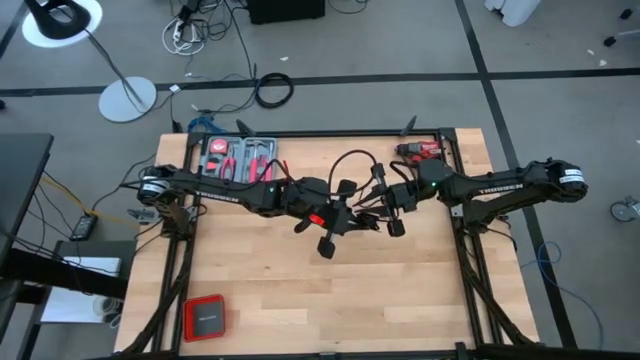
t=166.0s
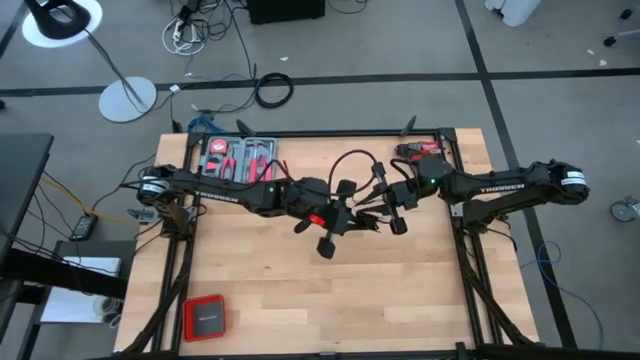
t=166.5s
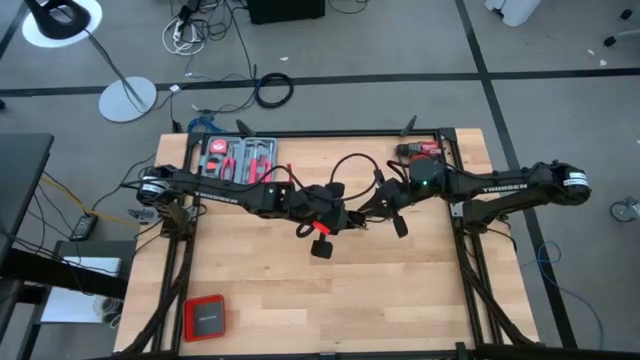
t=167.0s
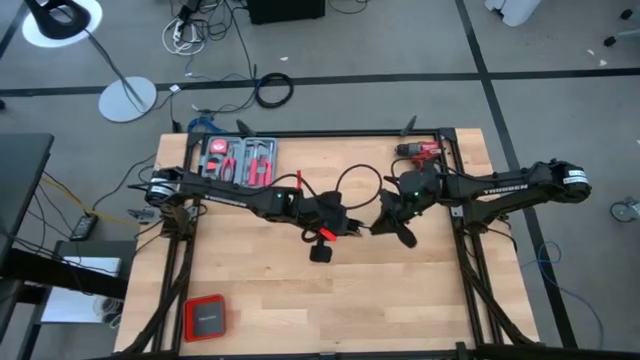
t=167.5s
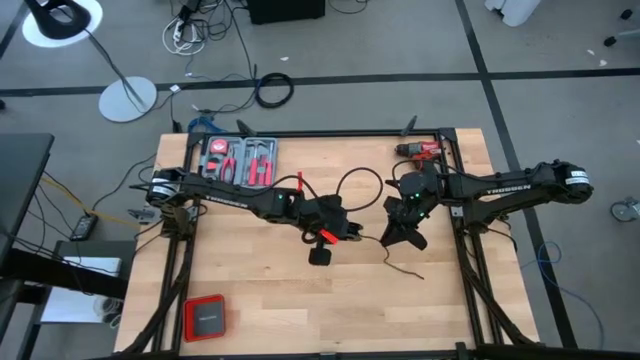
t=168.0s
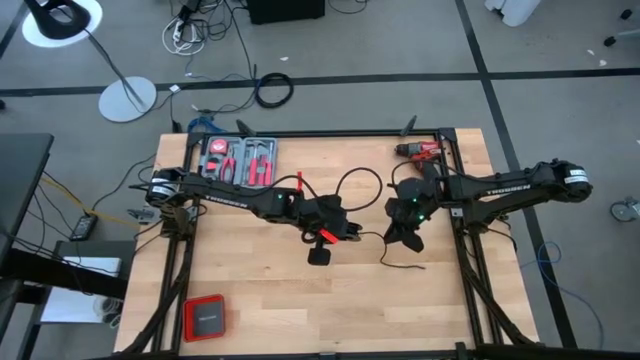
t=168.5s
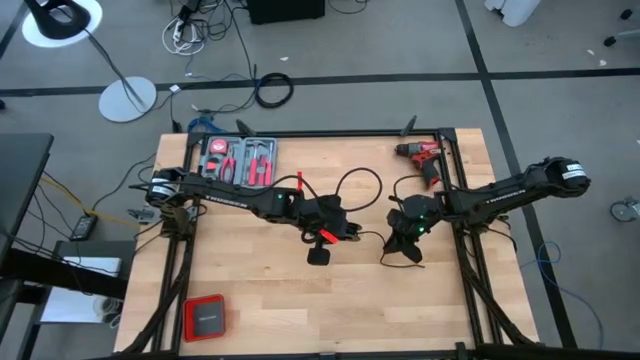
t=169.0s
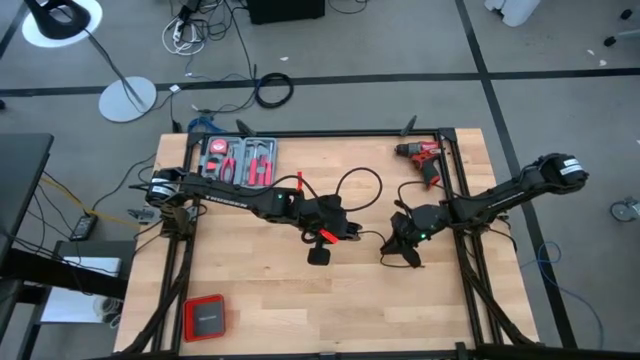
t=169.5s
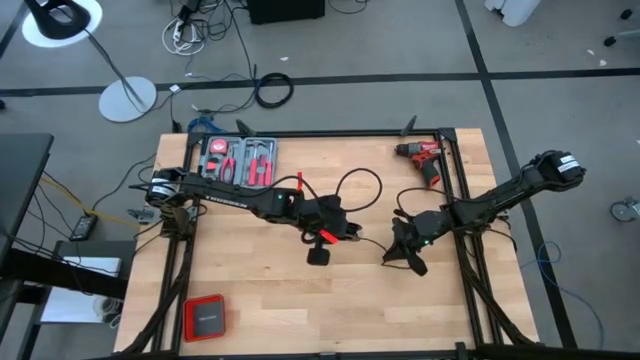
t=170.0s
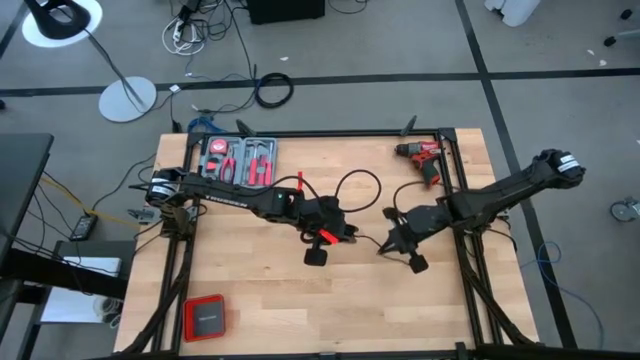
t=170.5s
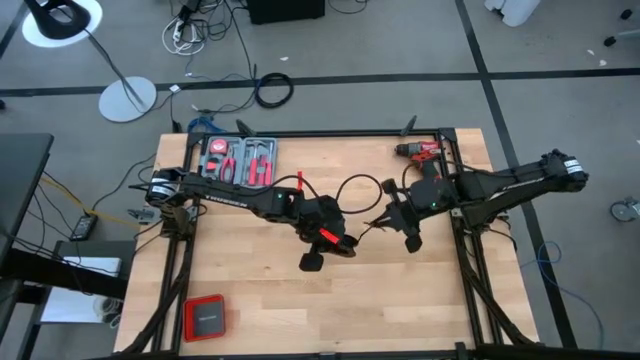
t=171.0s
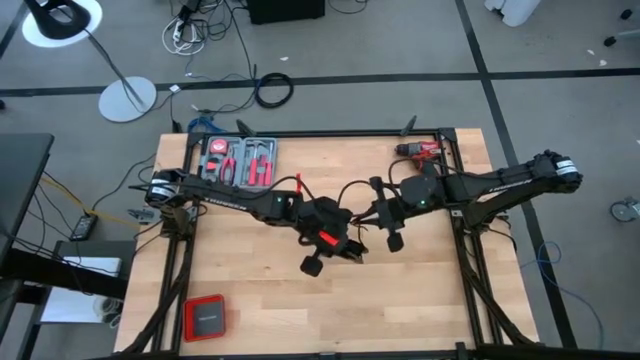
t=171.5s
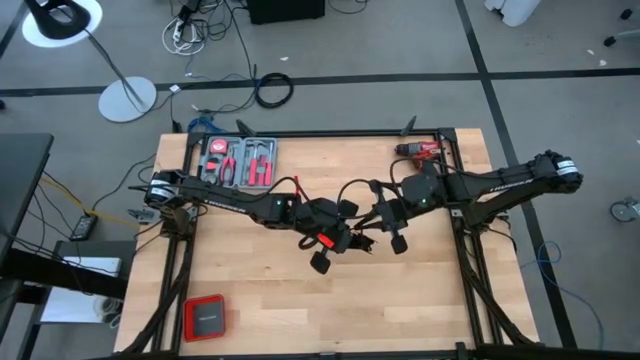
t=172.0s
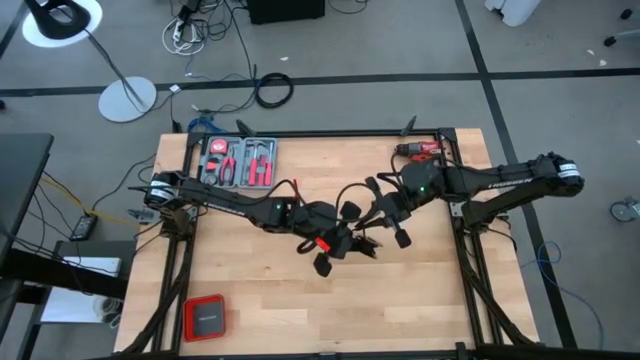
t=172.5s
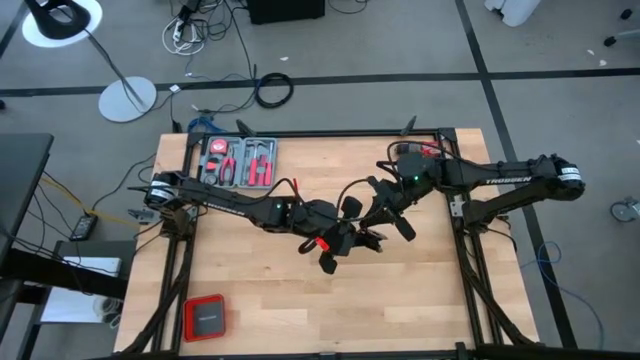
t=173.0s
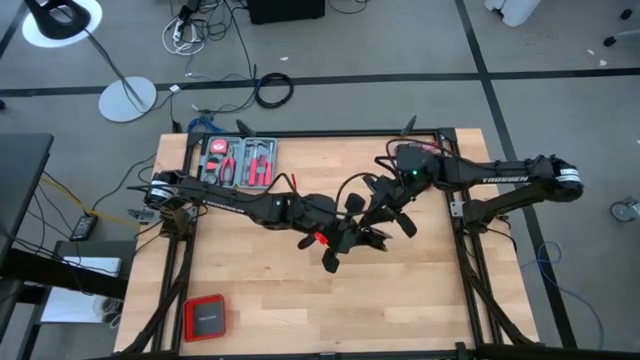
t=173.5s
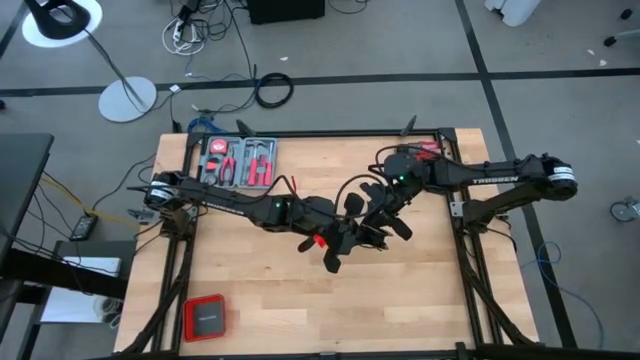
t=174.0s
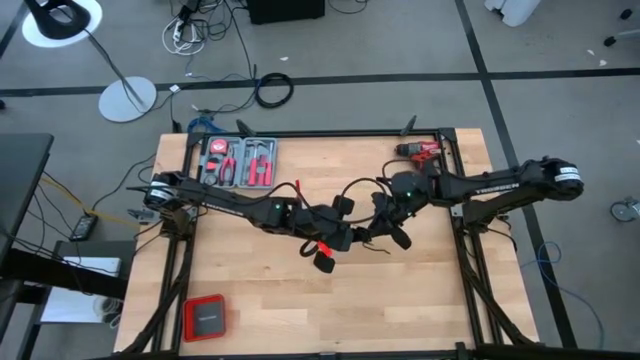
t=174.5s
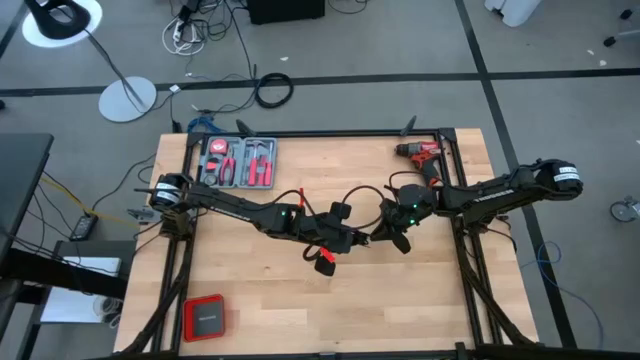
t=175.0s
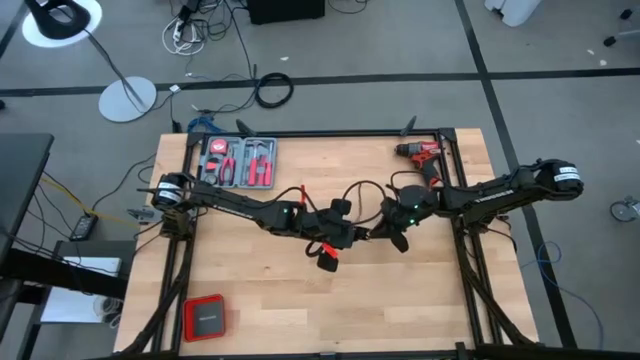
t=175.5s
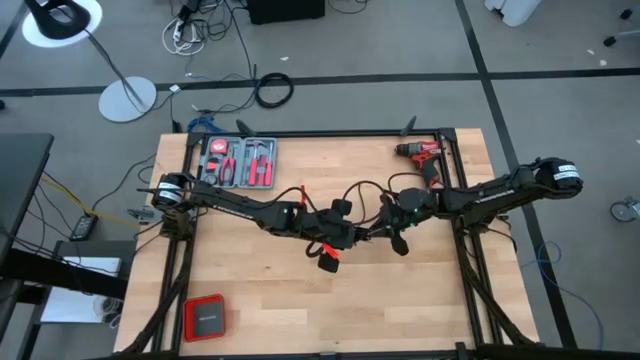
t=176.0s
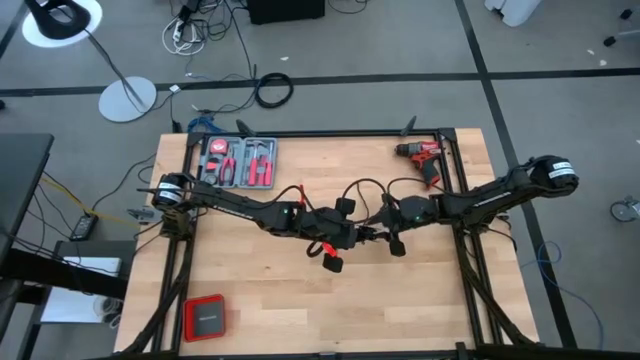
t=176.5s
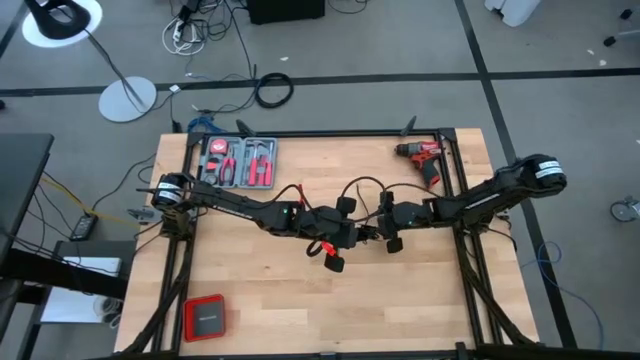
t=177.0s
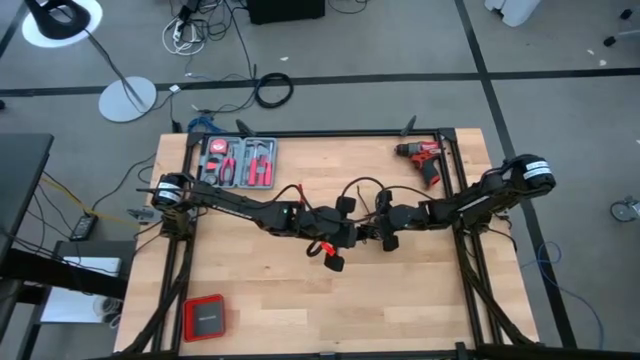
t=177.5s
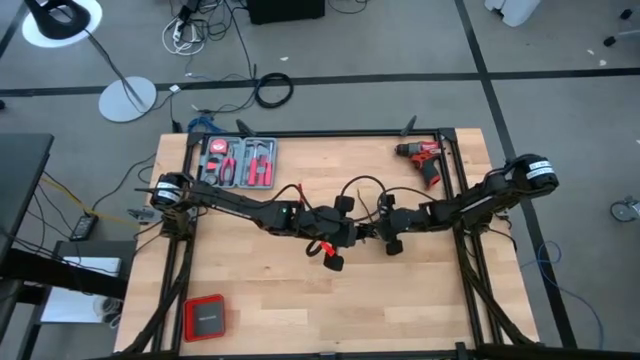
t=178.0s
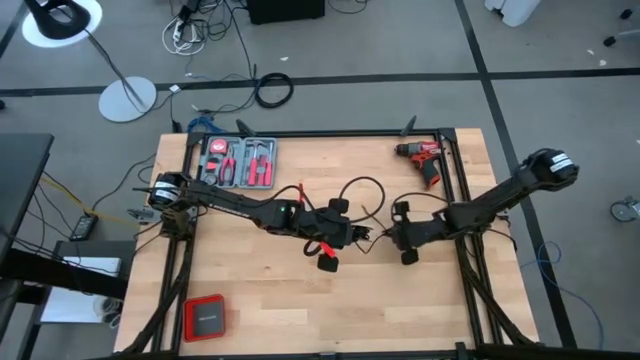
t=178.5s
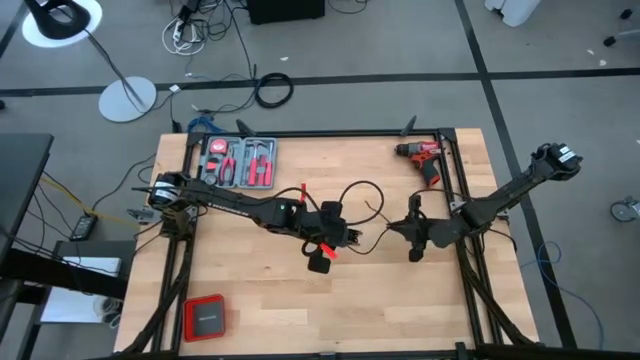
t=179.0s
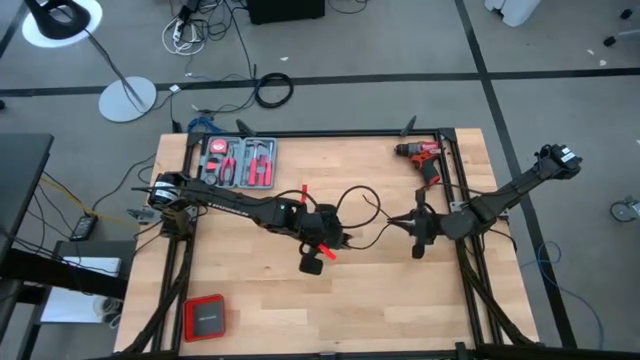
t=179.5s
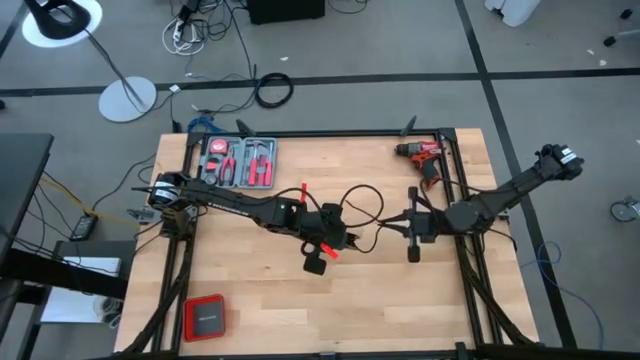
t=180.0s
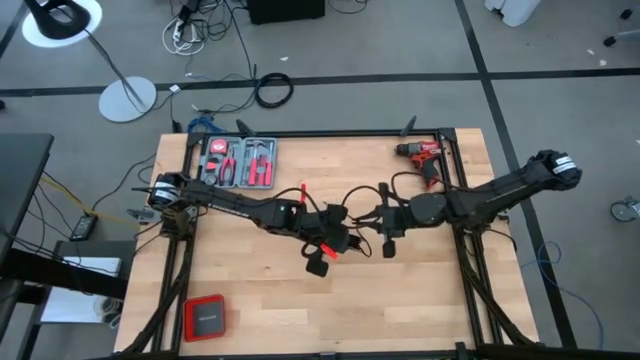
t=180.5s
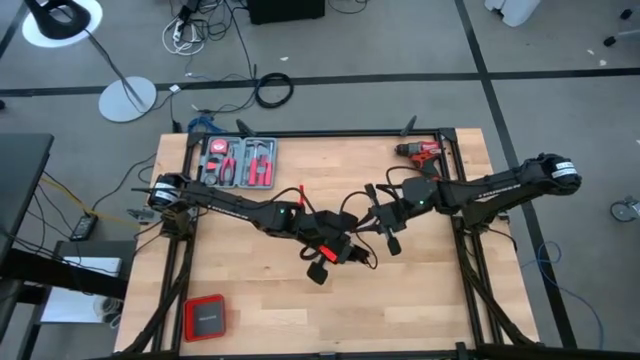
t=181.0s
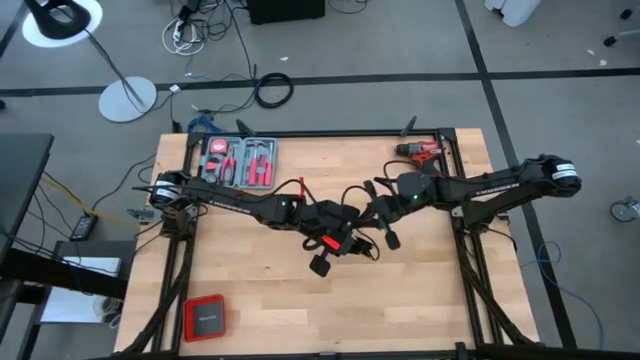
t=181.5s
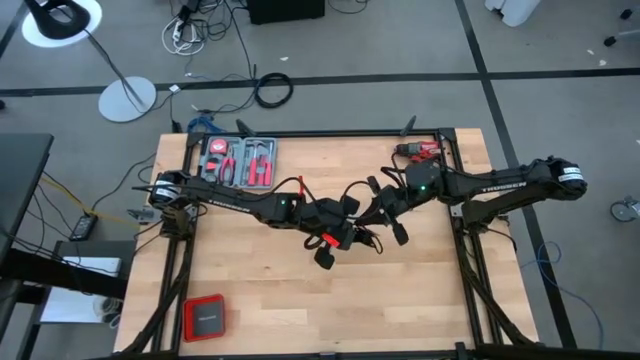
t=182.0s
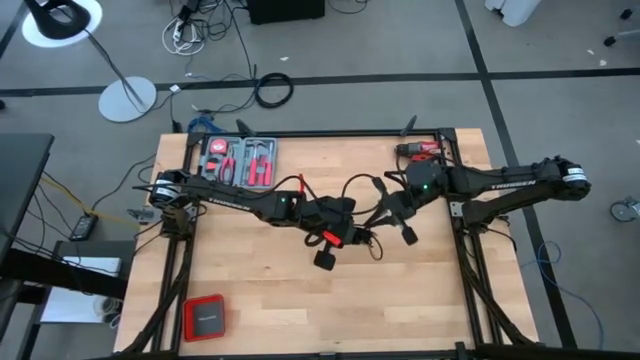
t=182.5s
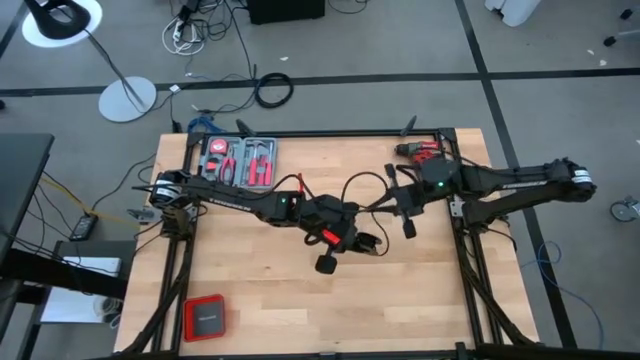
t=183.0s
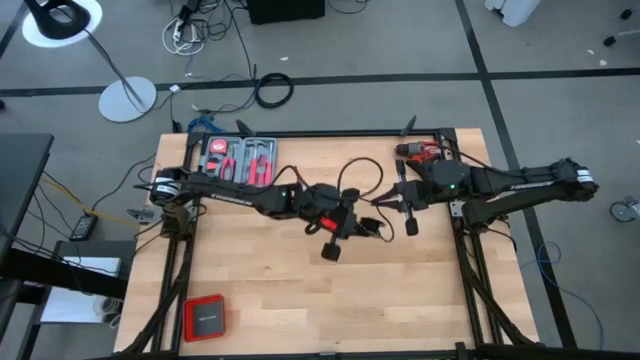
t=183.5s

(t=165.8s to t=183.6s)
Task: Coil cords
Coil the black wire on the spool

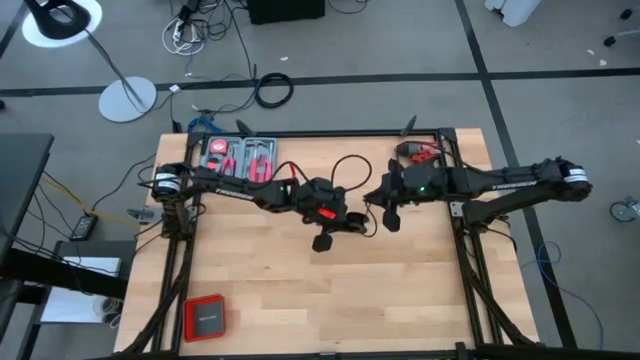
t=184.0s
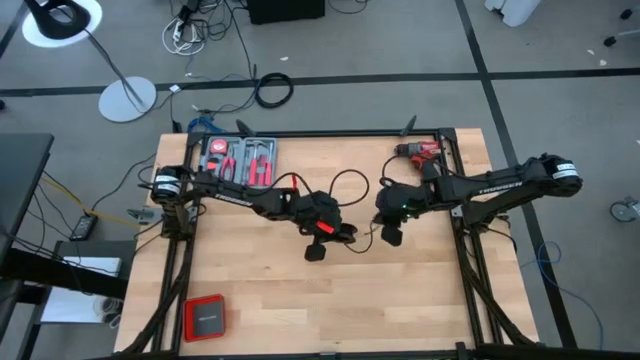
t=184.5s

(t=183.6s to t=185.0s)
Coil the black wire on the spool

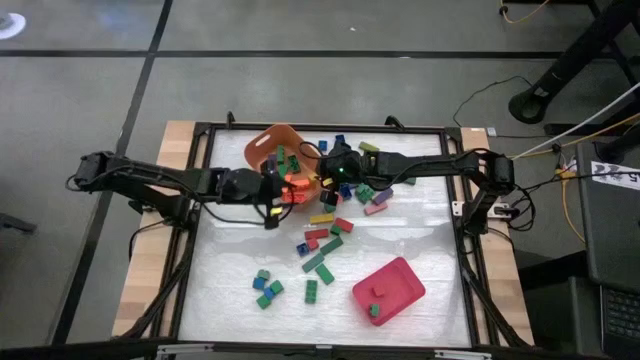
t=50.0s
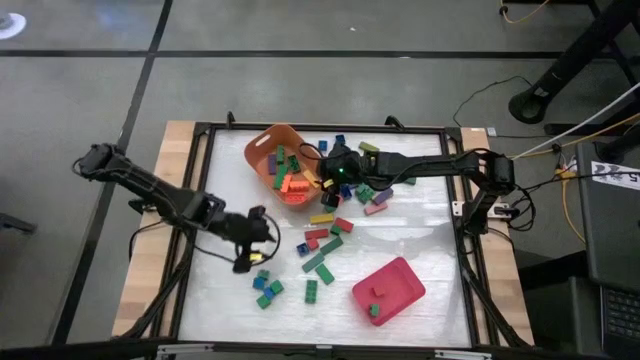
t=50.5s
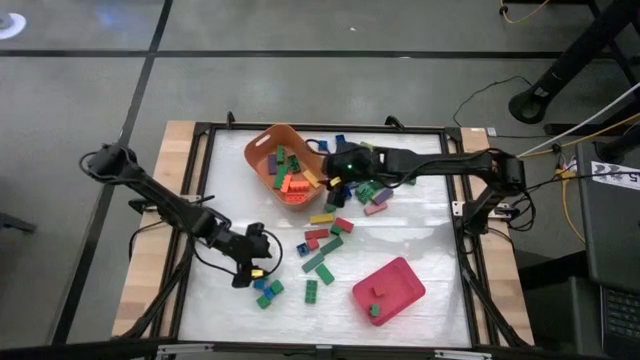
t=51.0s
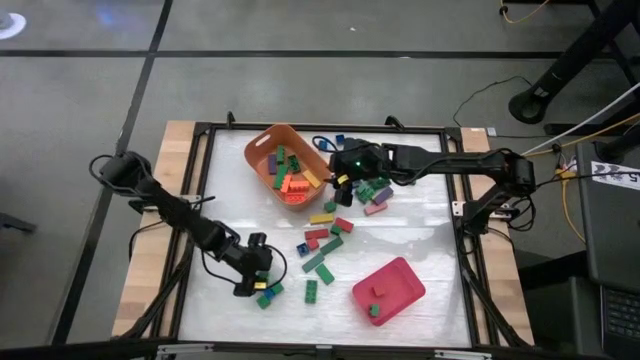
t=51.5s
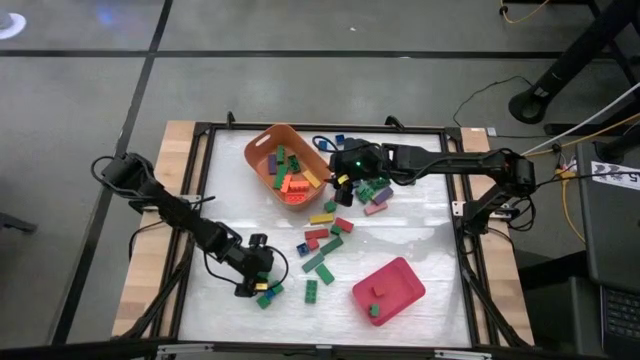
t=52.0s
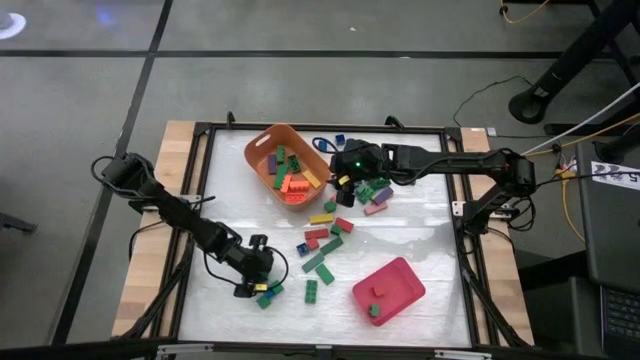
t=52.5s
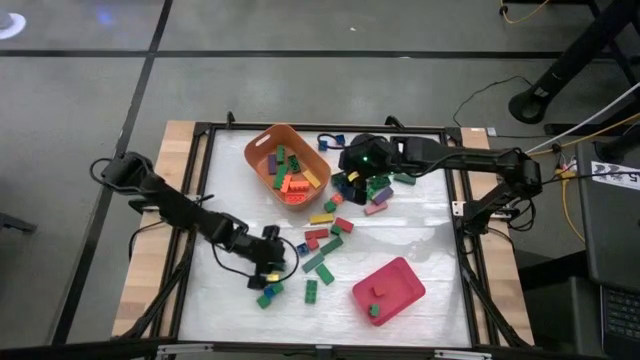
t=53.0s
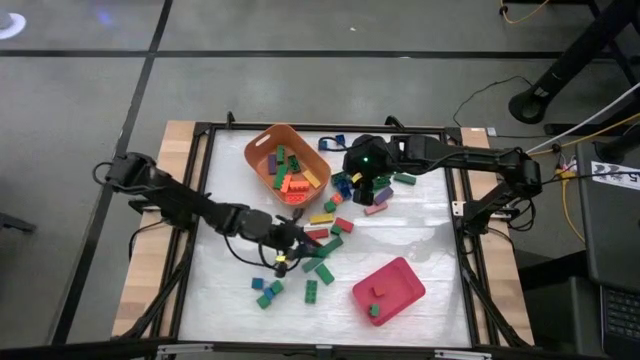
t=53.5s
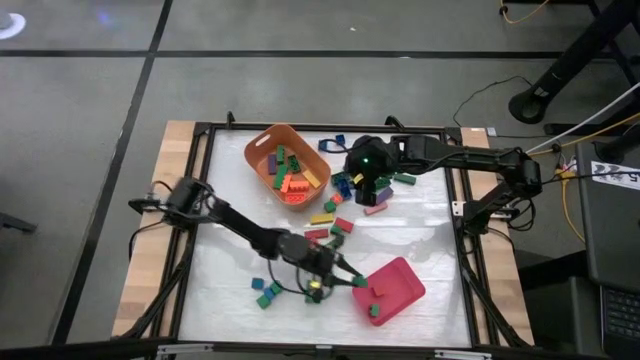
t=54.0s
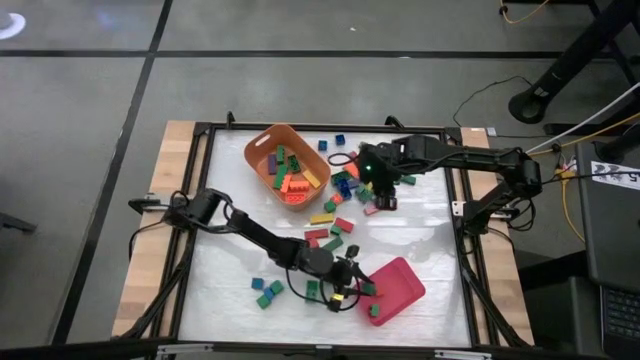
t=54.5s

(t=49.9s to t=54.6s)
Task: Sort blocks by size
Put the small green game piece into the red bin
